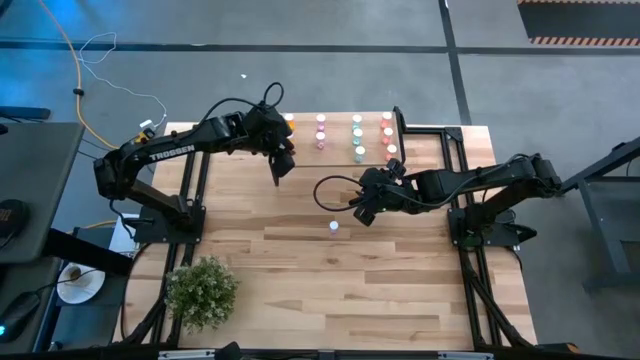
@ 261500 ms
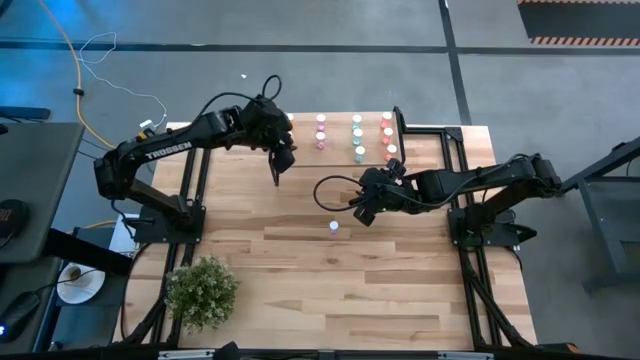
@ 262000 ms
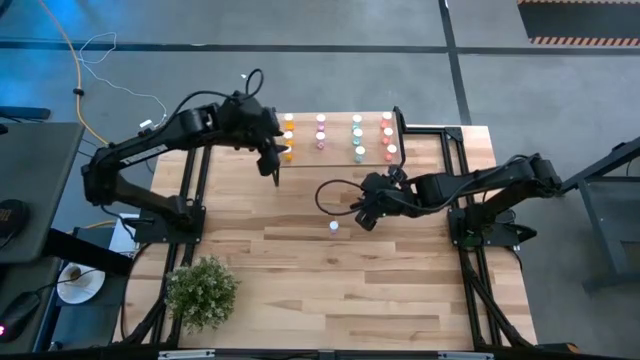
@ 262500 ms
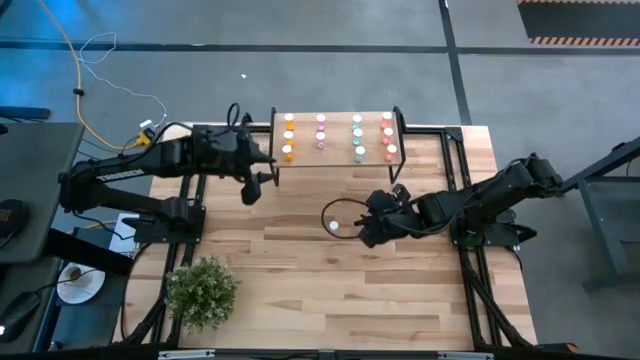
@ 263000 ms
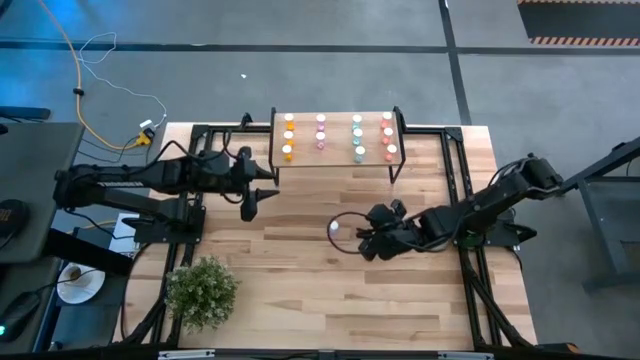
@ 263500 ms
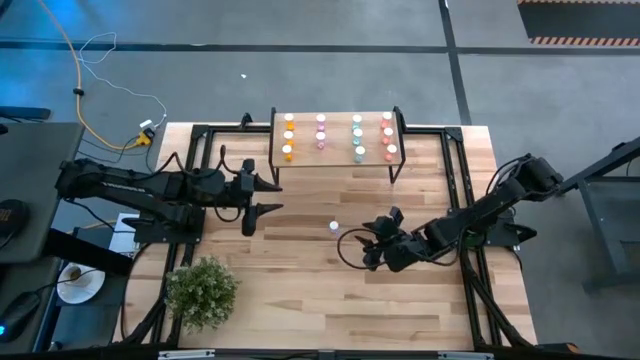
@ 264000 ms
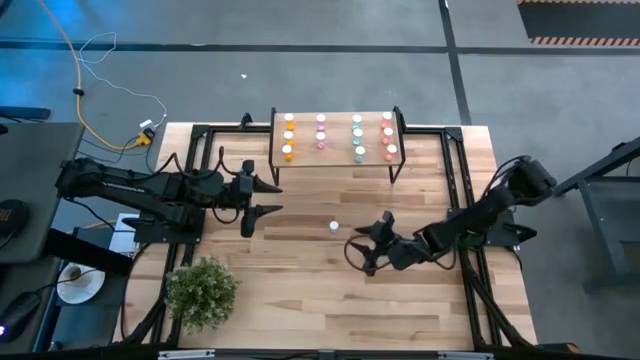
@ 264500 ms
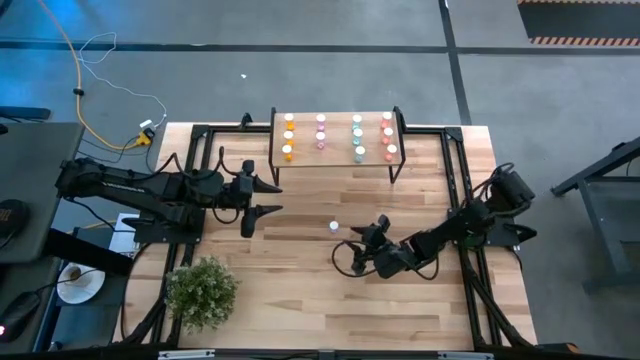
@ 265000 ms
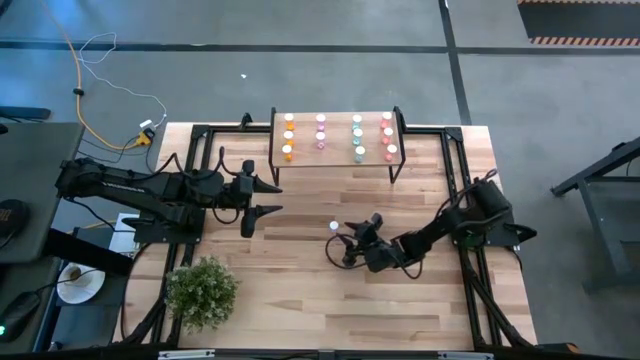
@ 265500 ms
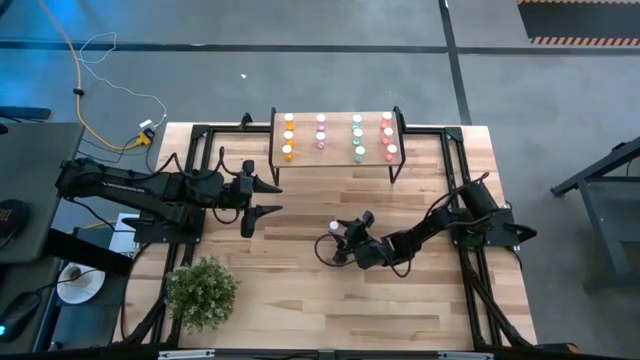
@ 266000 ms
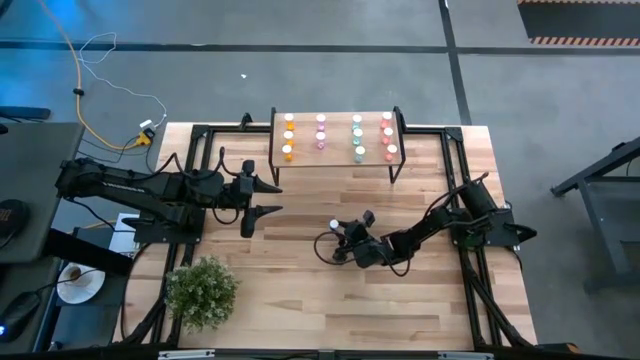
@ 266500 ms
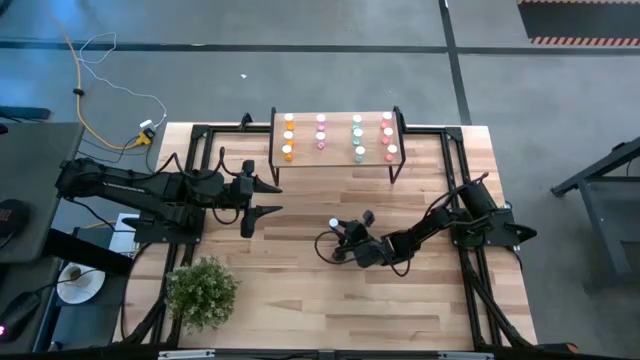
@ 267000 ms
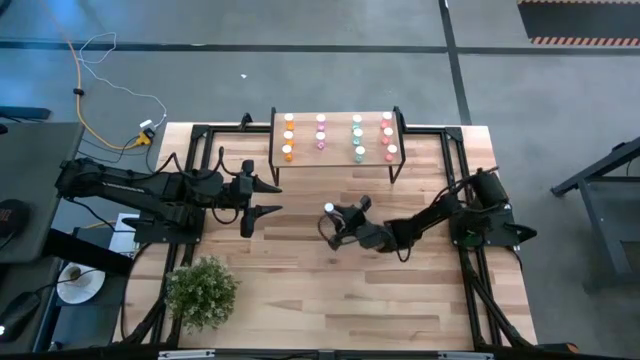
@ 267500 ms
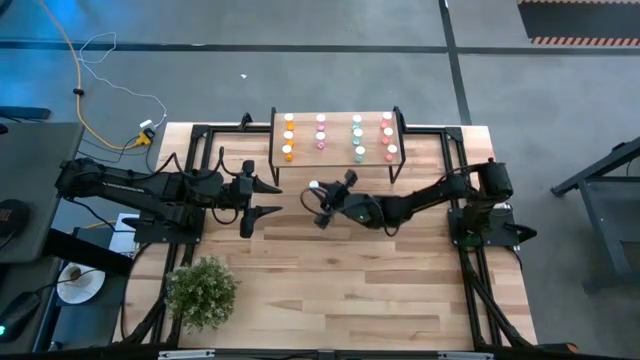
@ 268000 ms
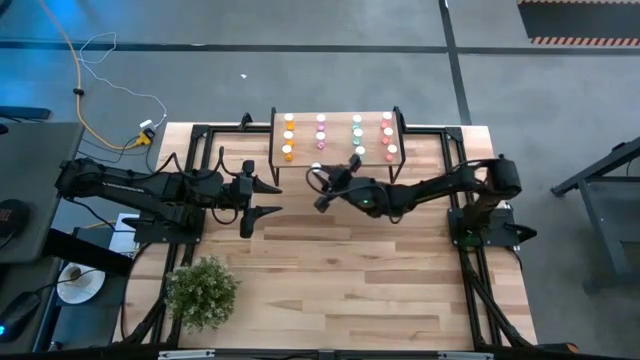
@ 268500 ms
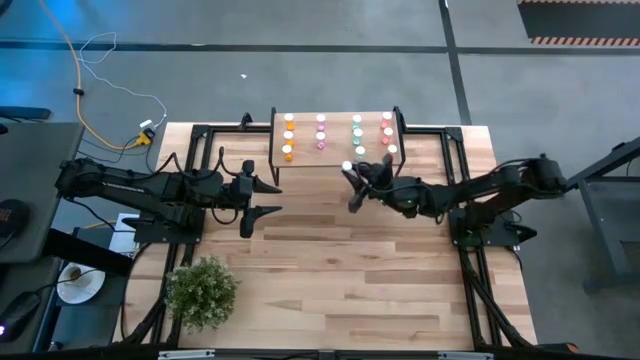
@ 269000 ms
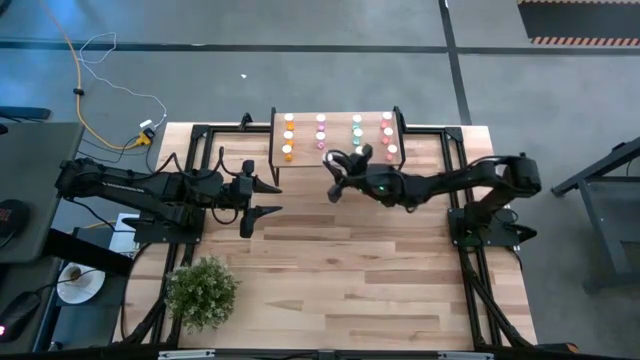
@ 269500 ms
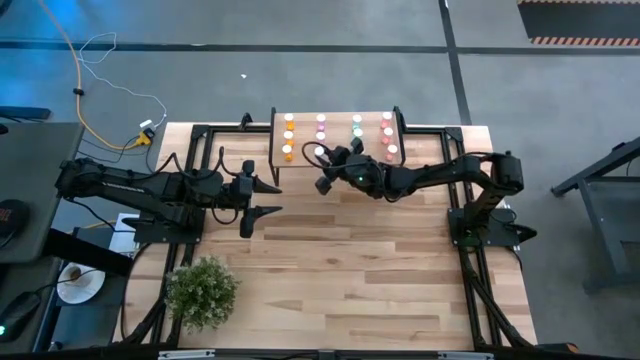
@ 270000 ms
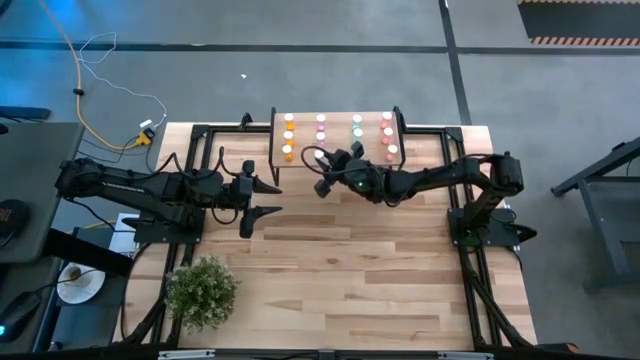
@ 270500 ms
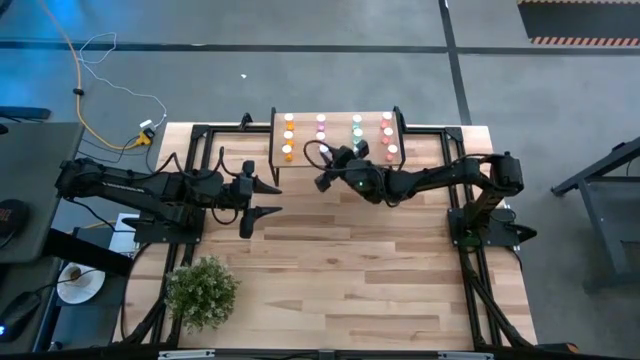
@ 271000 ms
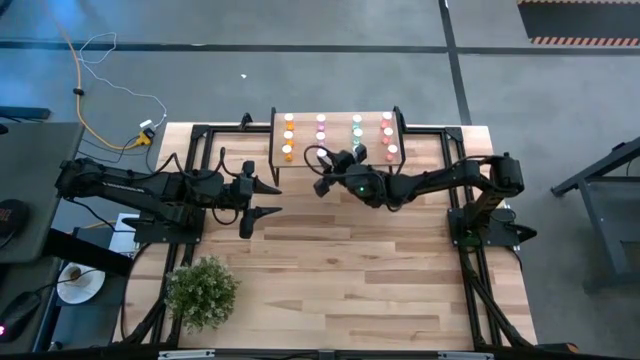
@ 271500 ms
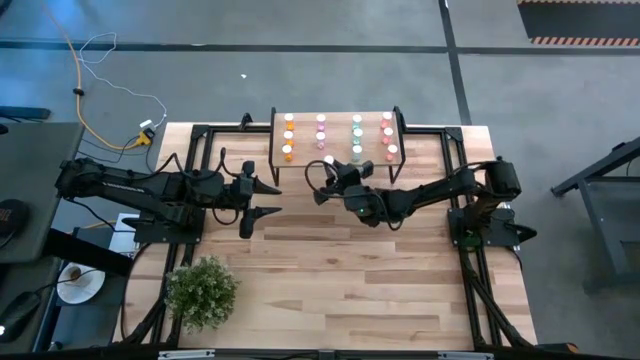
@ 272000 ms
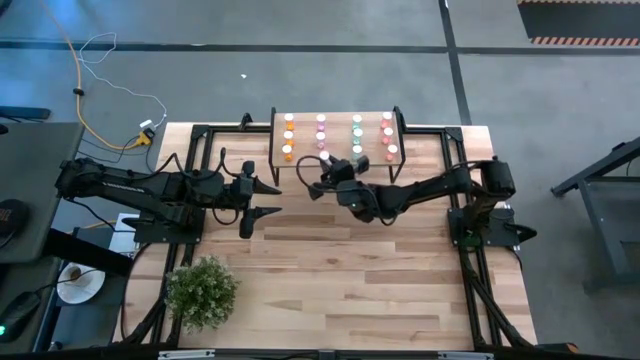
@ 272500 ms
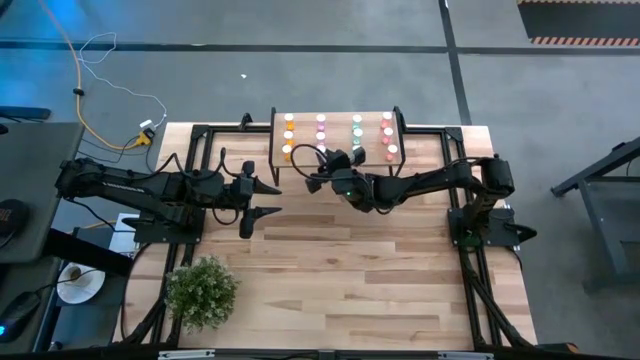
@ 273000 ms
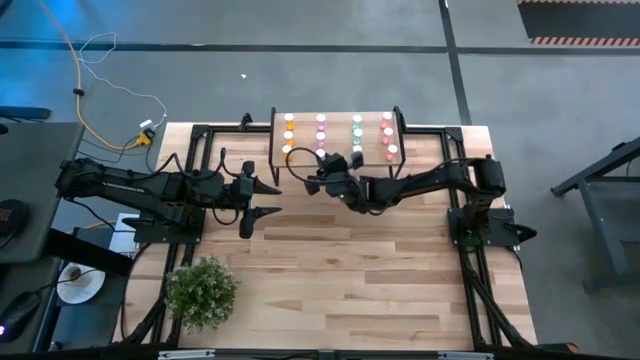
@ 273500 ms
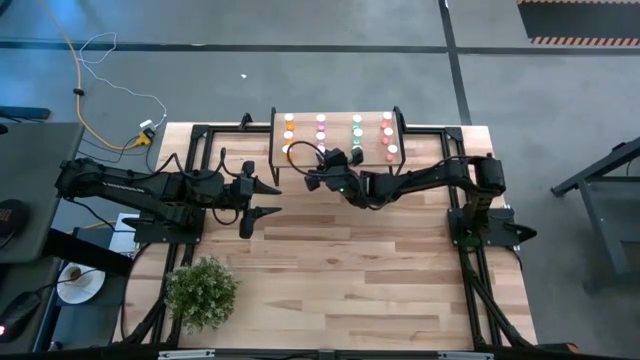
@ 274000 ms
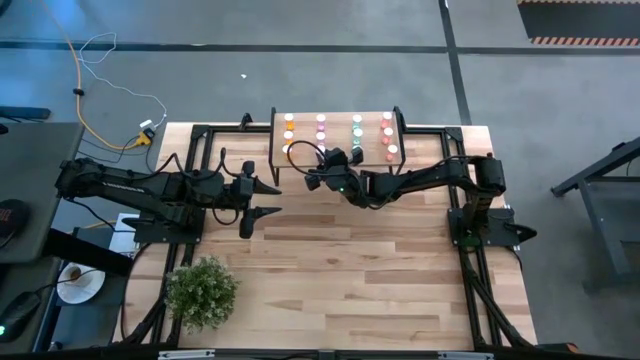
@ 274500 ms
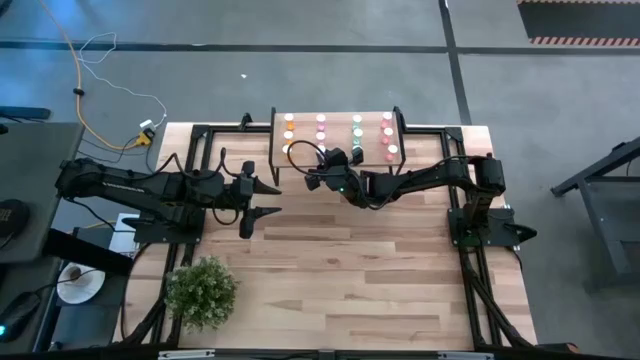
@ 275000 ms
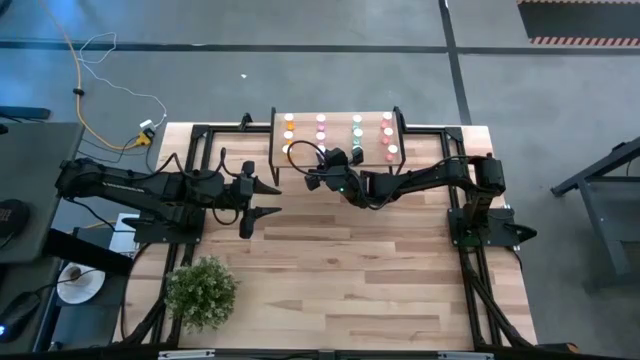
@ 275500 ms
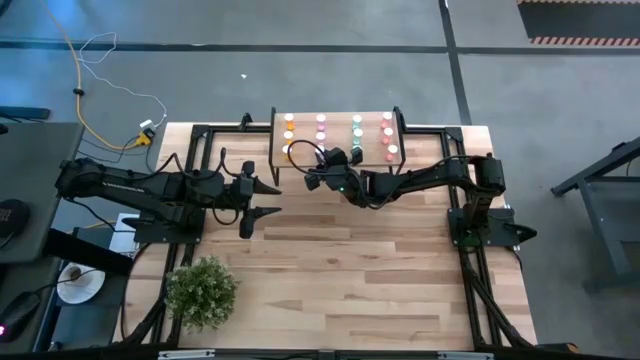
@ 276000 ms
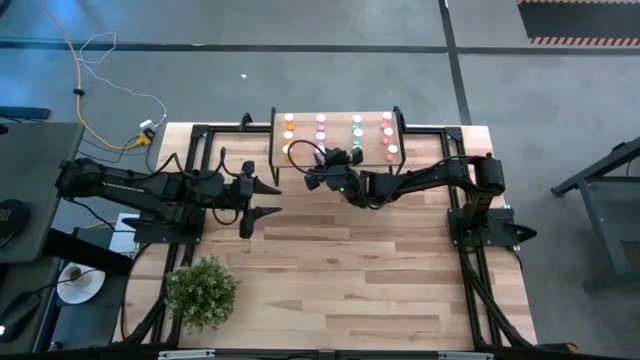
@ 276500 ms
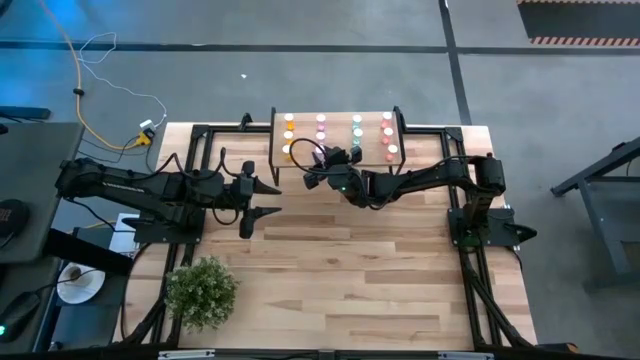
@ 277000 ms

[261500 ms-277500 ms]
Task: Pick and place medicine bottles onto shelf by color
Put the purple pill bottle on the shelf aligned with the other purple pill bottles

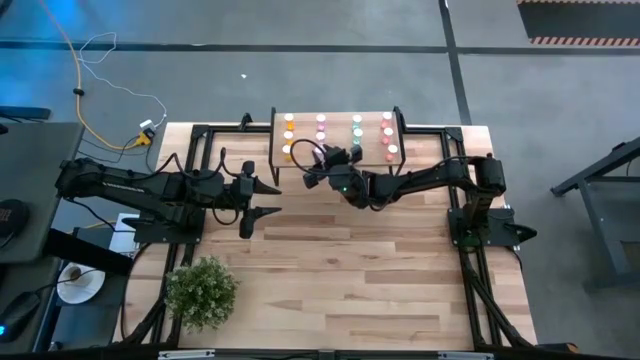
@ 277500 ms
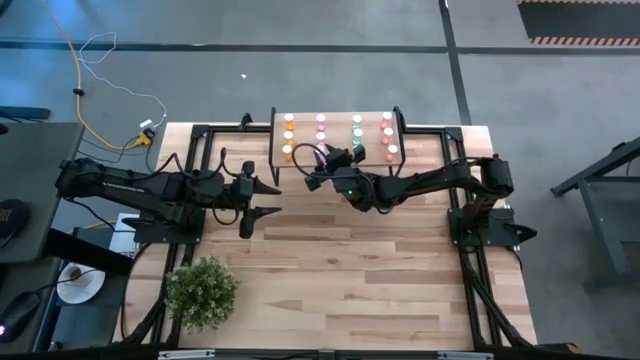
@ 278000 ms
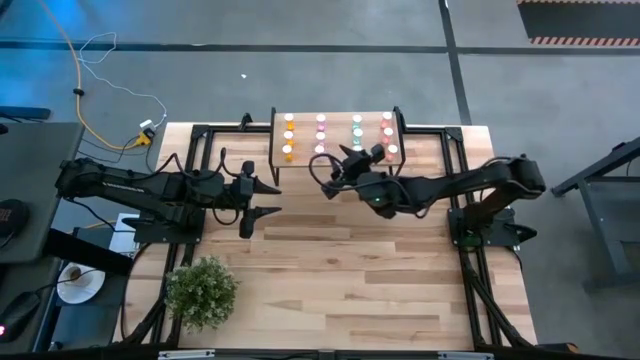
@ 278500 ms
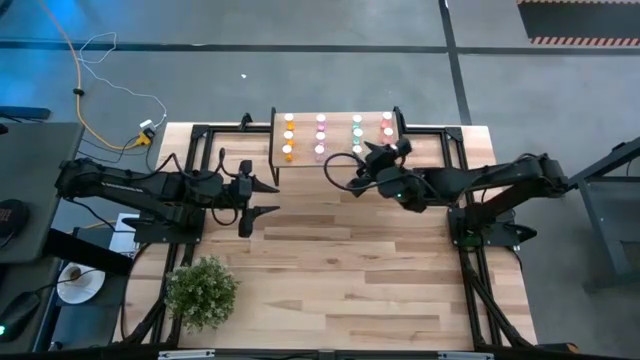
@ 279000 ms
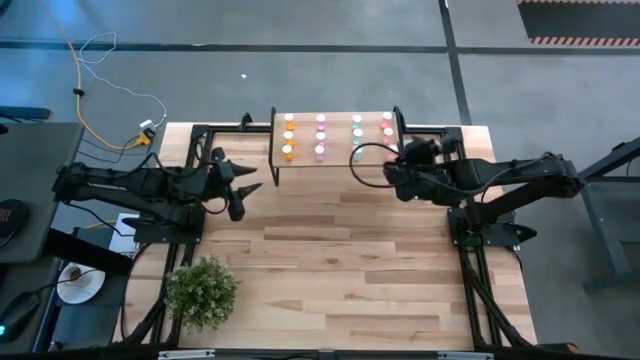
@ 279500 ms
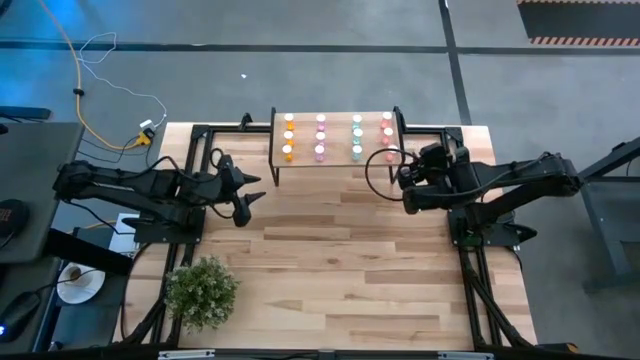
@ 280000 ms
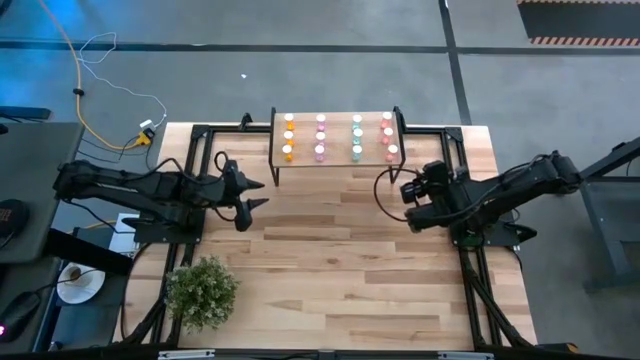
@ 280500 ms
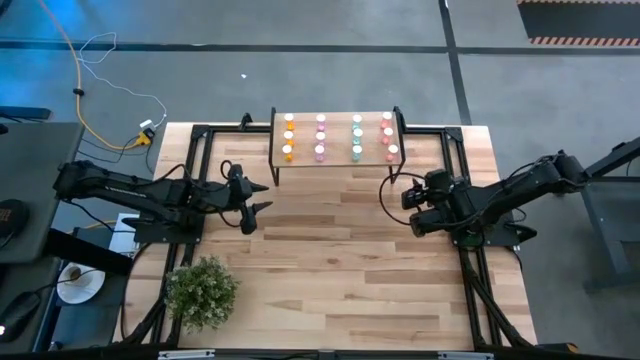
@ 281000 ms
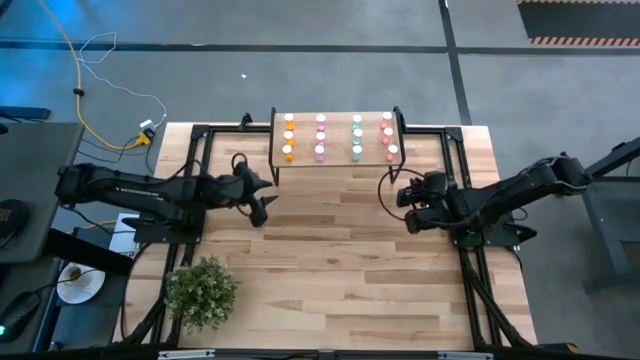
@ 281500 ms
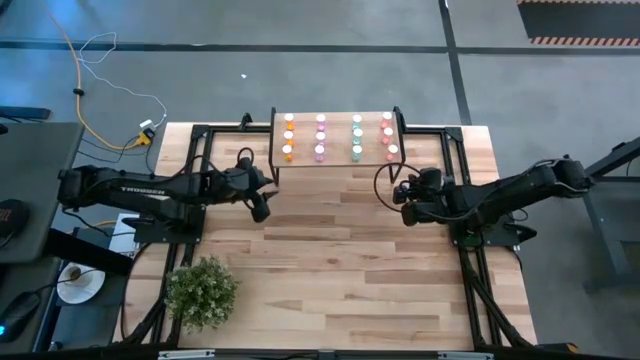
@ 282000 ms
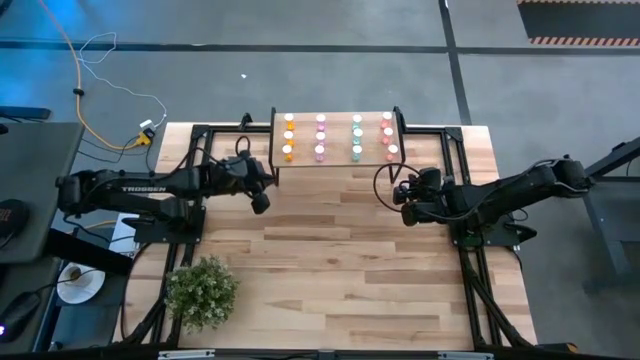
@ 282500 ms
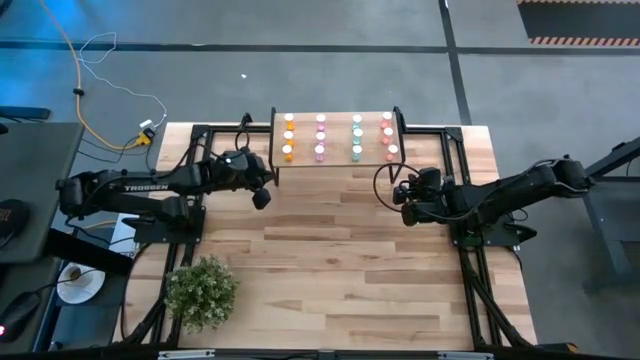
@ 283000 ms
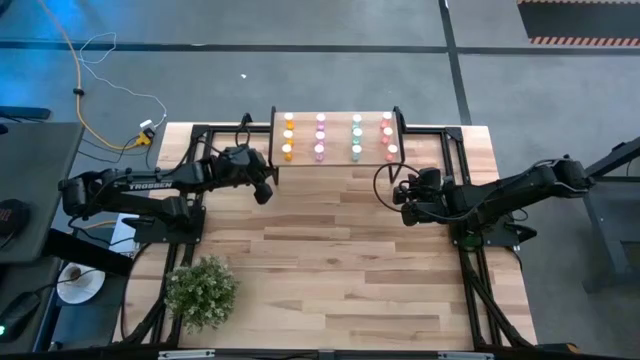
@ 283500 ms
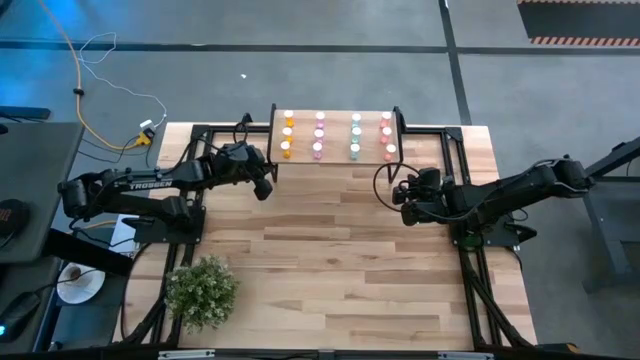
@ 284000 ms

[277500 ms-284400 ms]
Adjust the shelf
